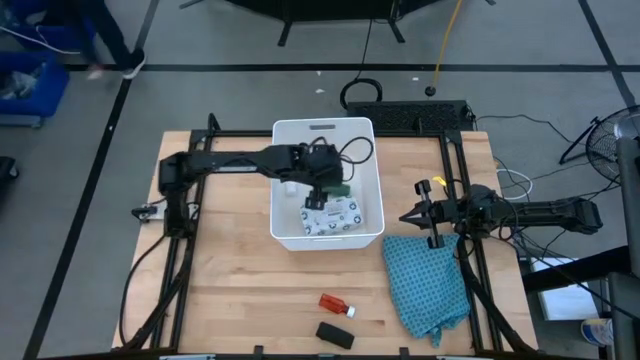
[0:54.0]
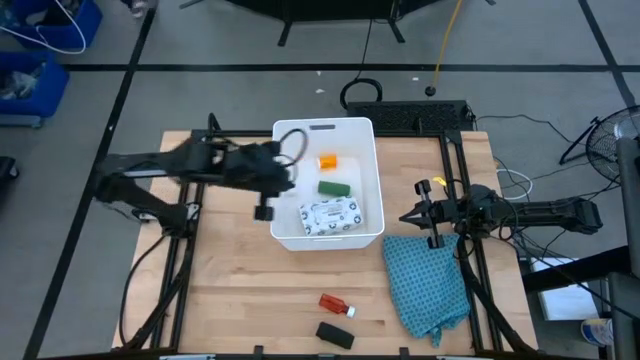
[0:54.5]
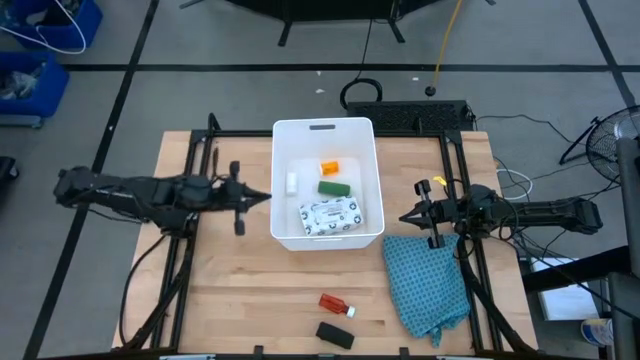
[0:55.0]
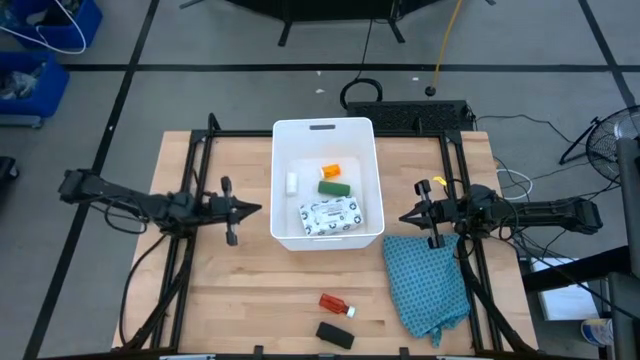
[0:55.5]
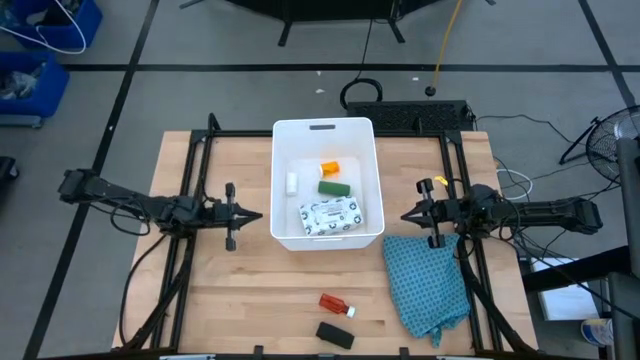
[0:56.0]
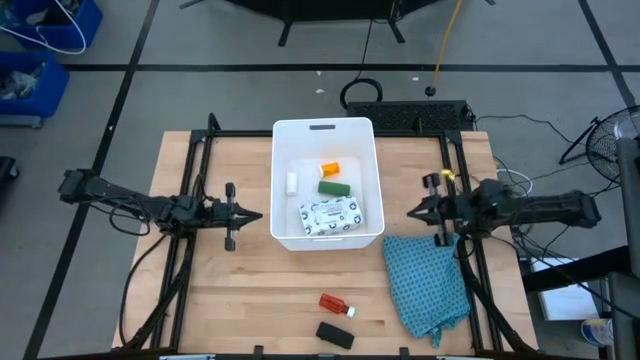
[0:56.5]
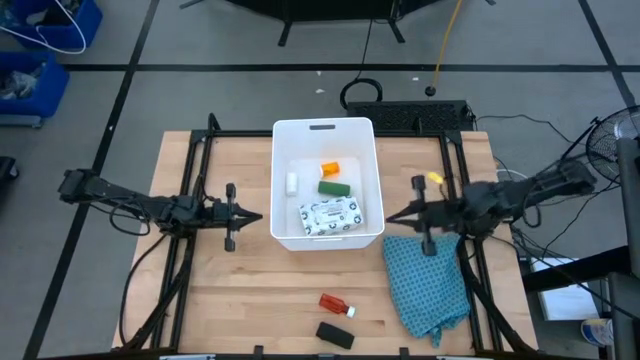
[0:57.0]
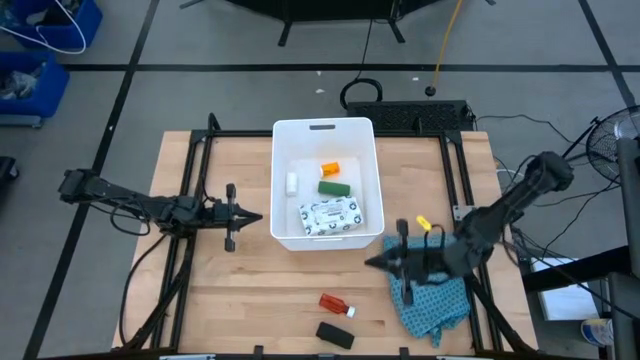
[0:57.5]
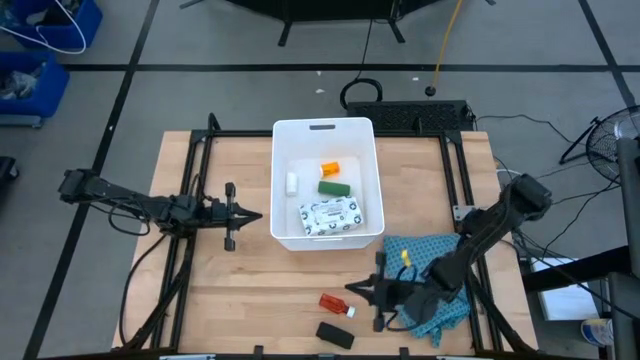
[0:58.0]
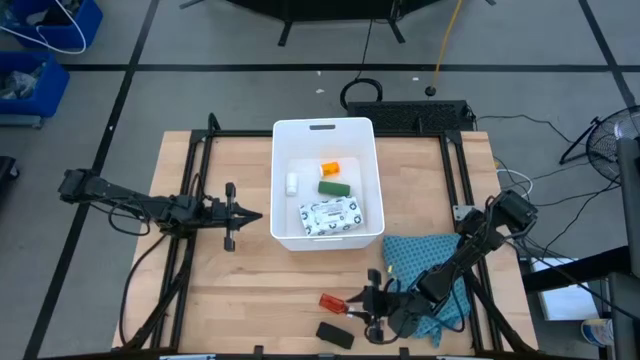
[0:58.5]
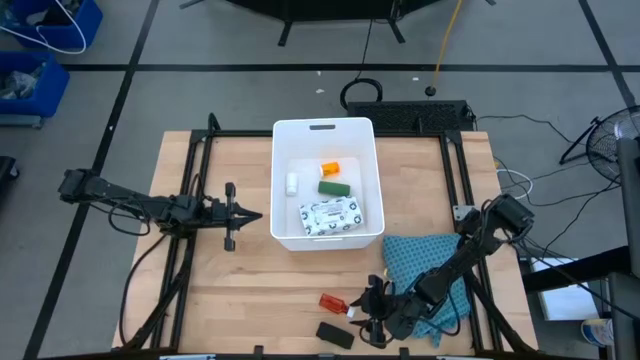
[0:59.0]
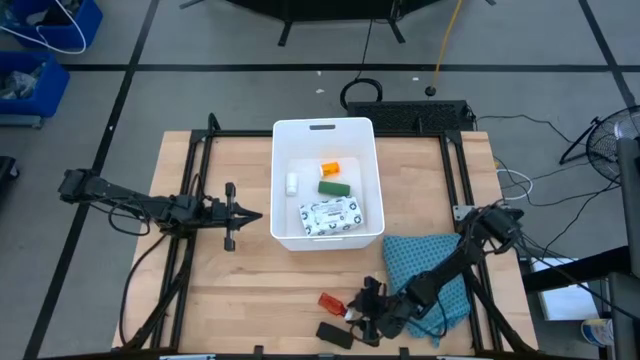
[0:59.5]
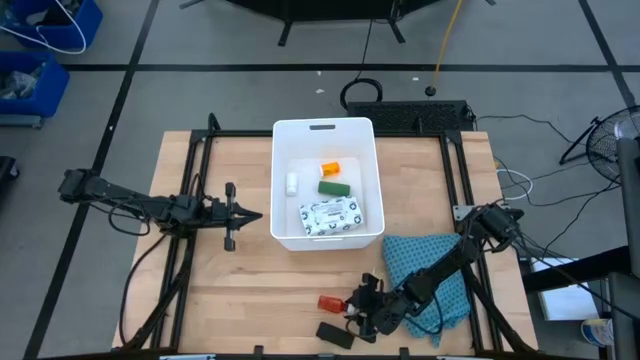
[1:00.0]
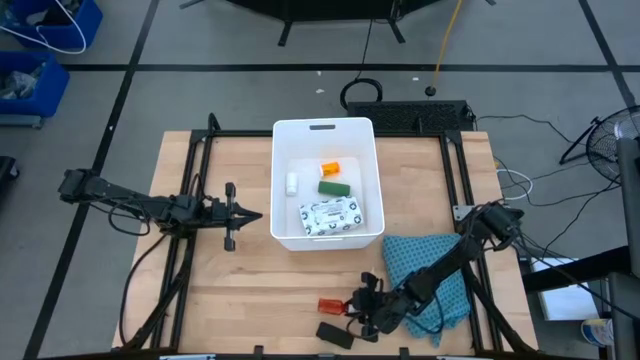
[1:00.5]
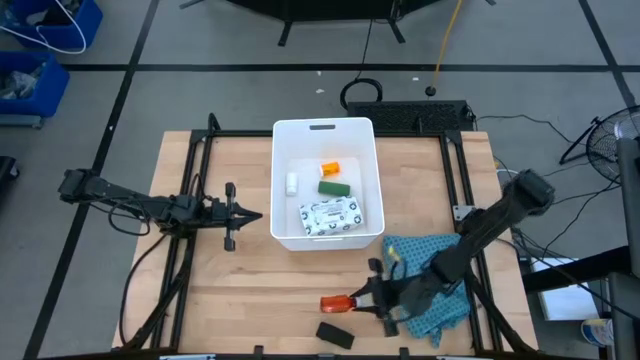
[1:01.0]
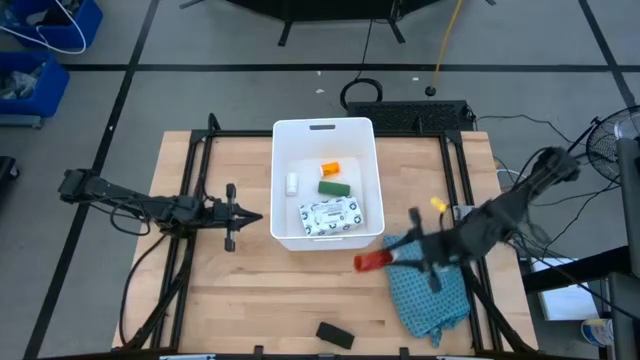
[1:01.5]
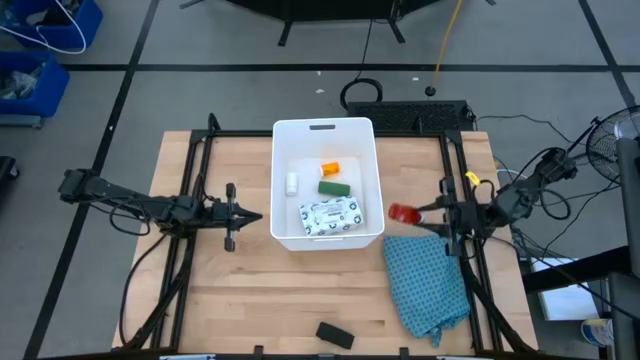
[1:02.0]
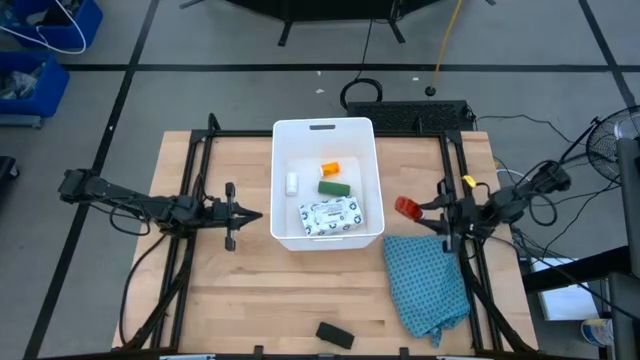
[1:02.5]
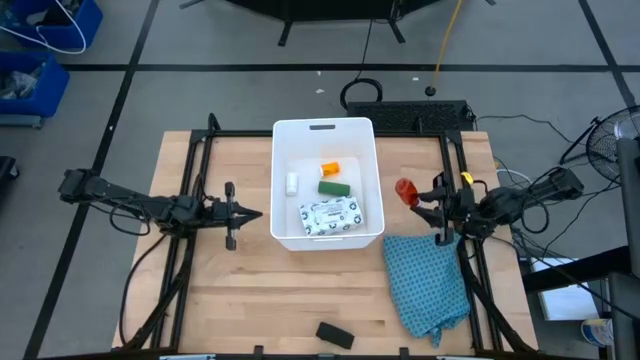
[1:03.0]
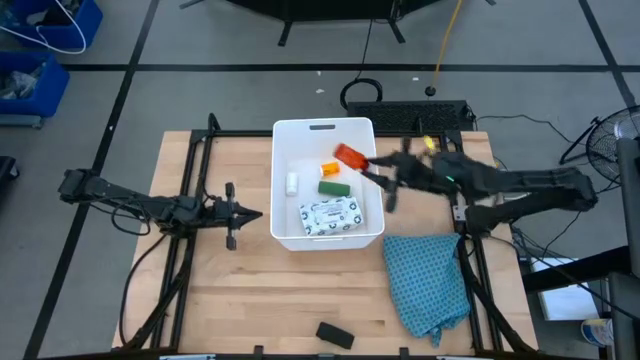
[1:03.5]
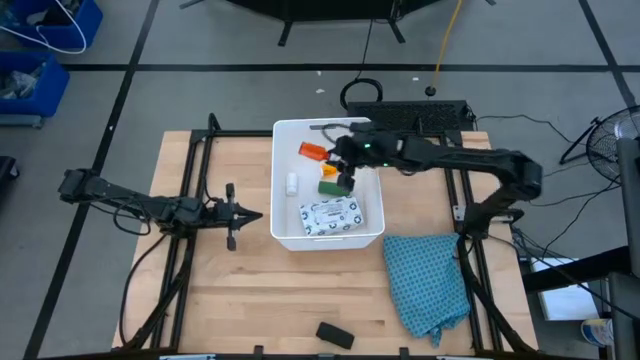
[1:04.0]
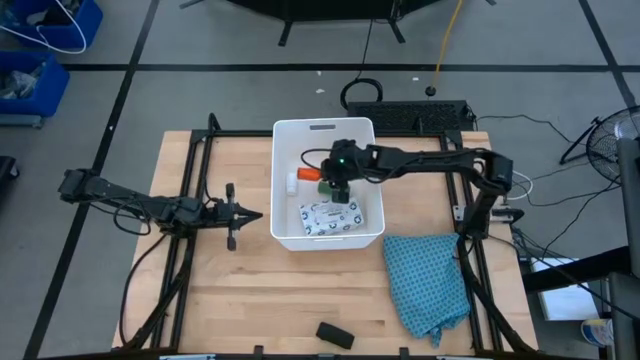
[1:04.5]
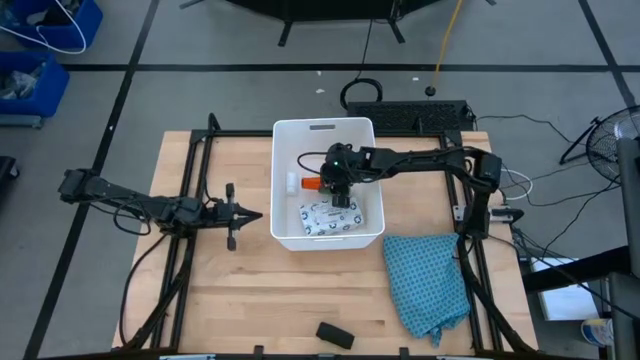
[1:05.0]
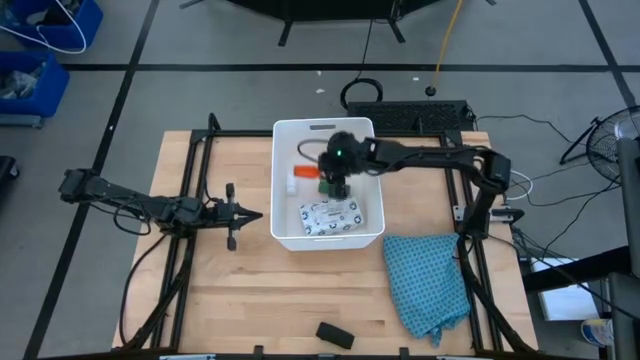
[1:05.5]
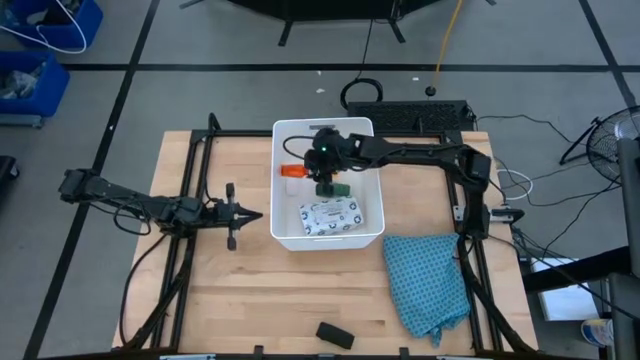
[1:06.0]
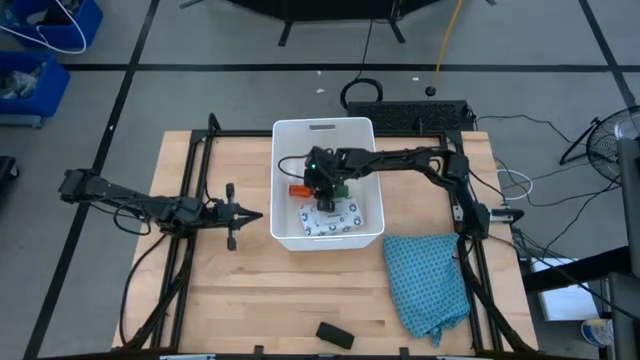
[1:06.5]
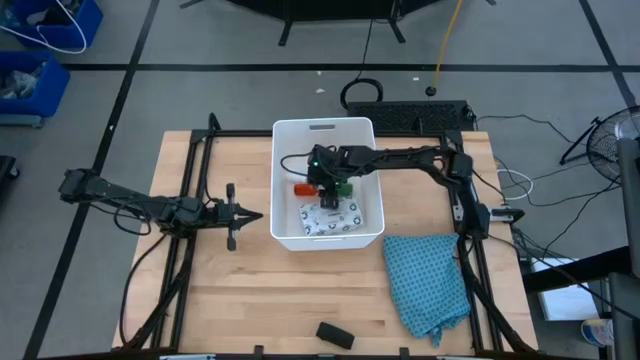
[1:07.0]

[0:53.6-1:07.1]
Task: Pick & place medical supplies in basket/bin
Put the red medicine bottle into the white bin

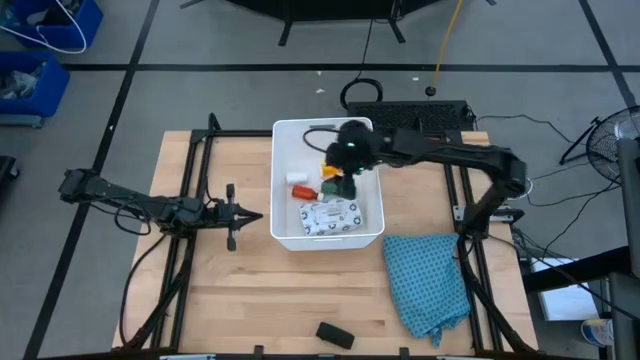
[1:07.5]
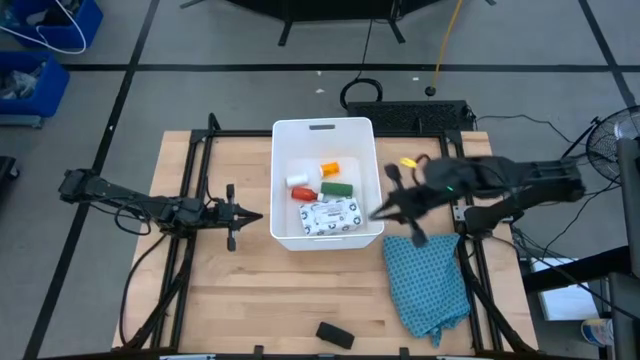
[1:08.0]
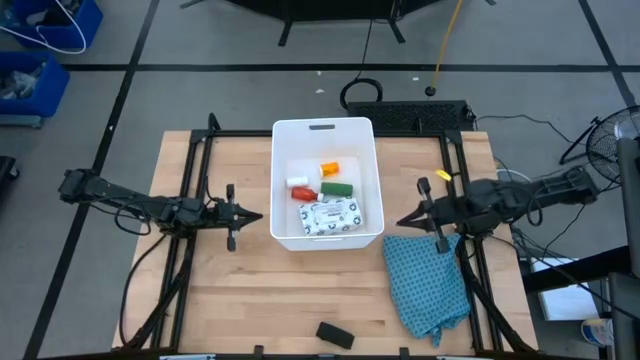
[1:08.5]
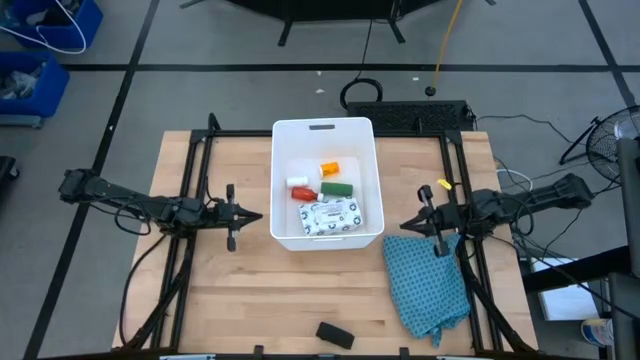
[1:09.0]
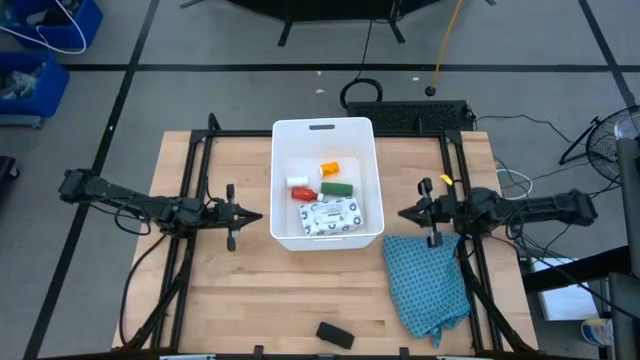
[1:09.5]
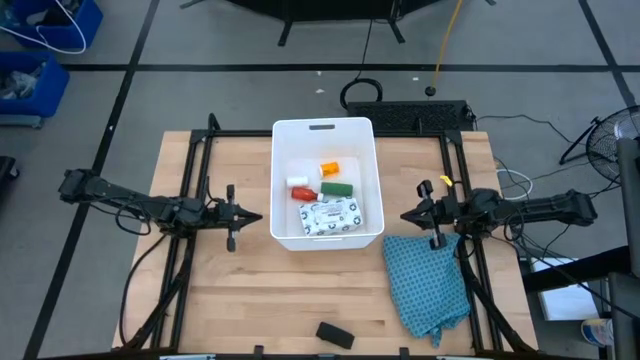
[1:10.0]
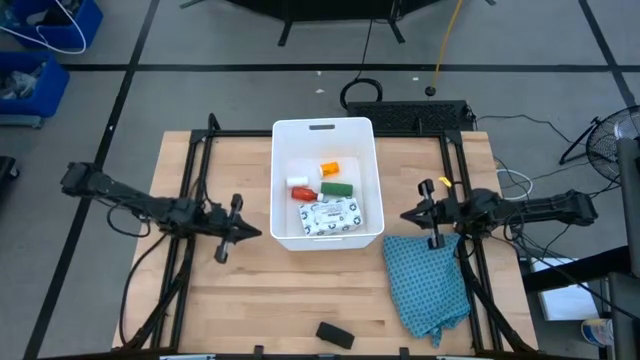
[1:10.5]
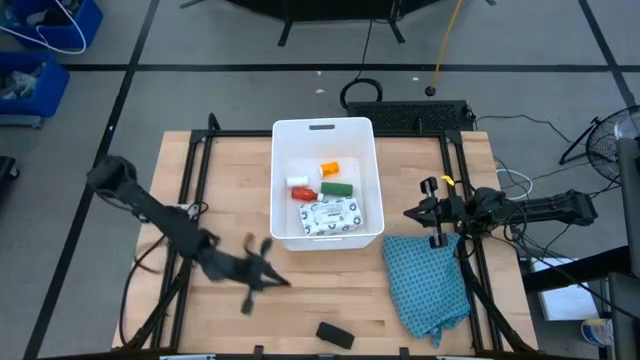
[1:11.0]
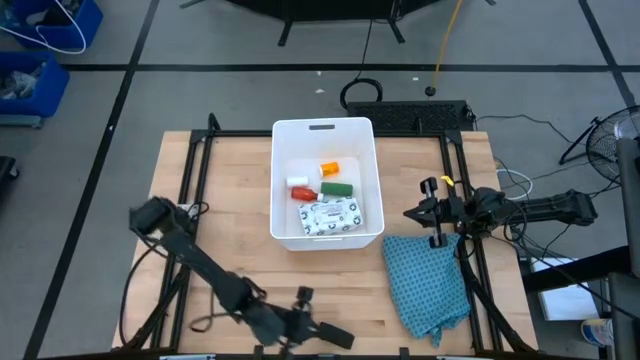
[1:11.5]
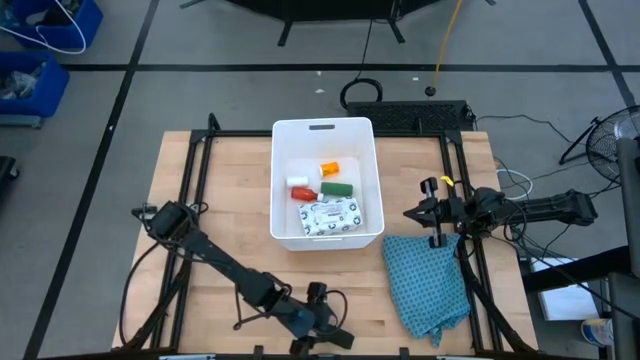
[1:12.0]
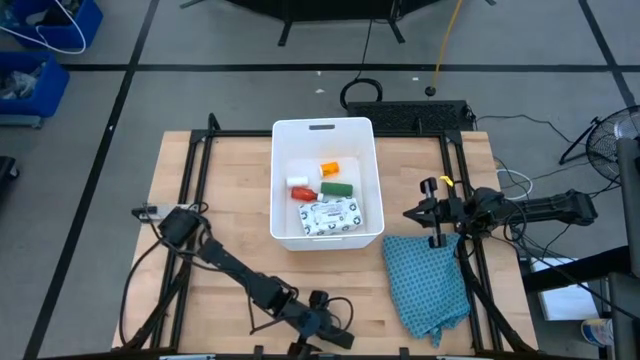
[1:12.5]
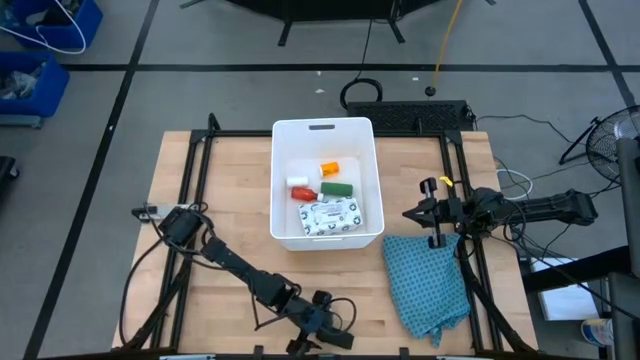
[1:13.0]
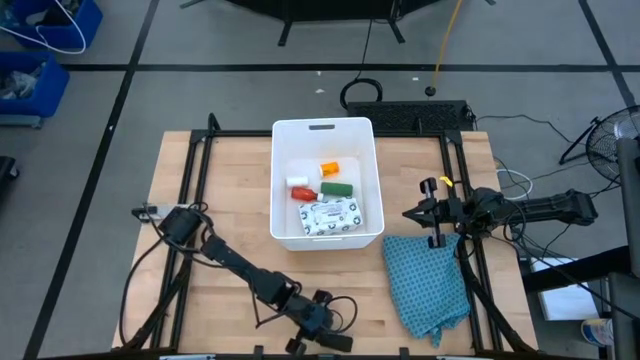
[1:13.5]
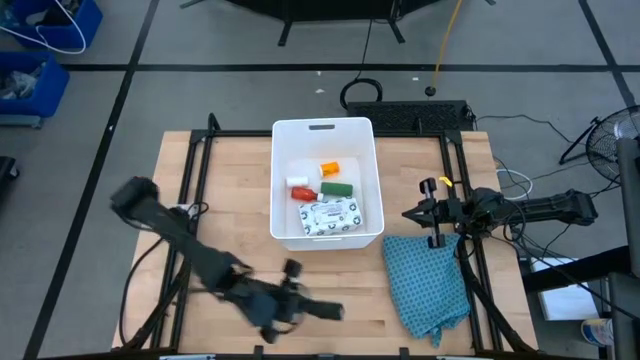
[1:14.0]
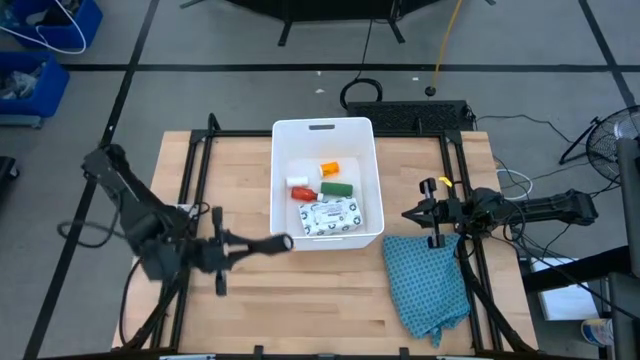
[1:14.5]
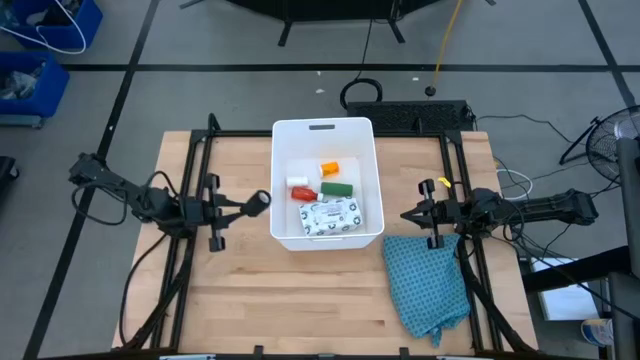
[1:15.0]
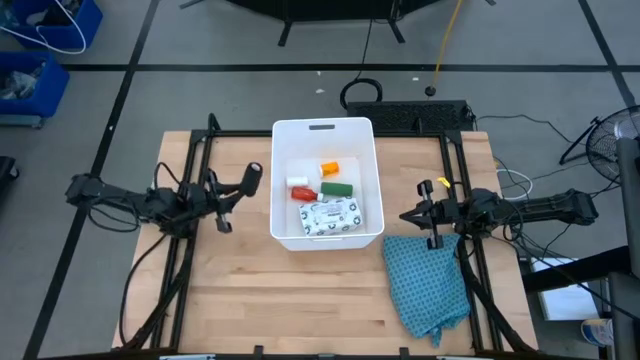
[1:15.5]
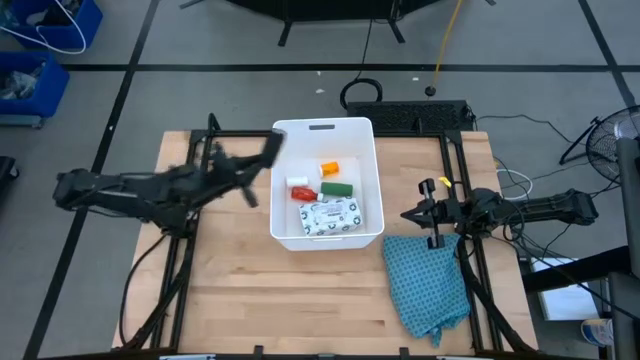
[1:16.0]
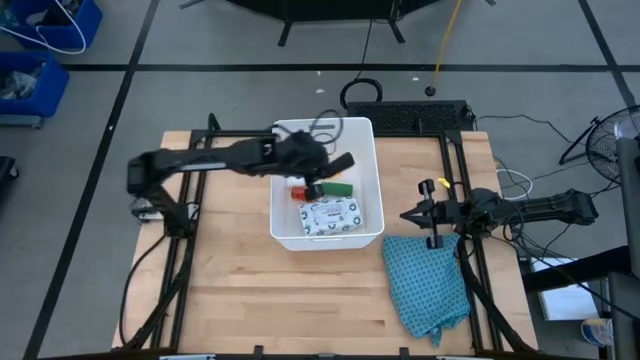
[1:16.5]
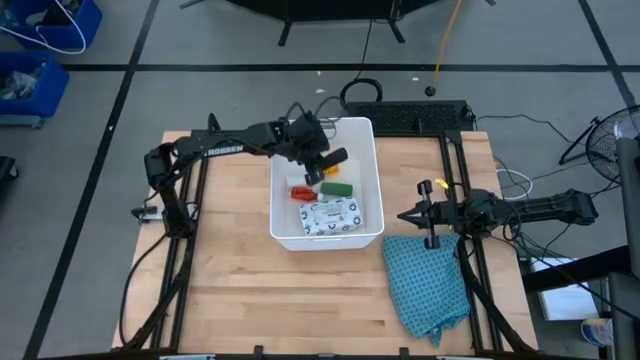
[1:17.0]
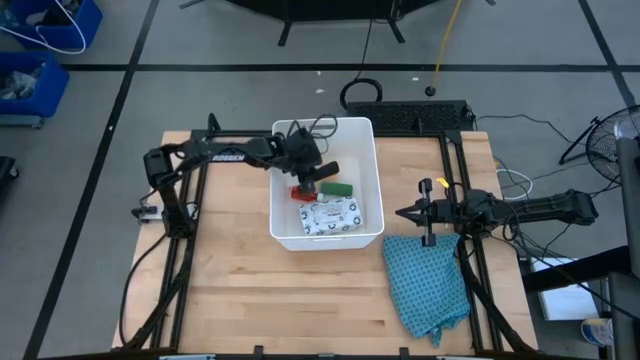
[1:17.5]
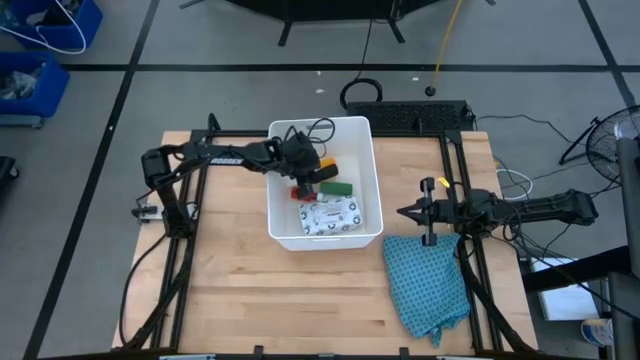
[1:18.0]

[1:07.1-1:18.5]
Put the black bandage into the white bin
